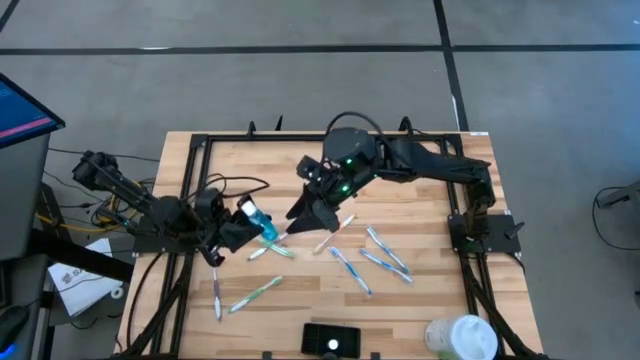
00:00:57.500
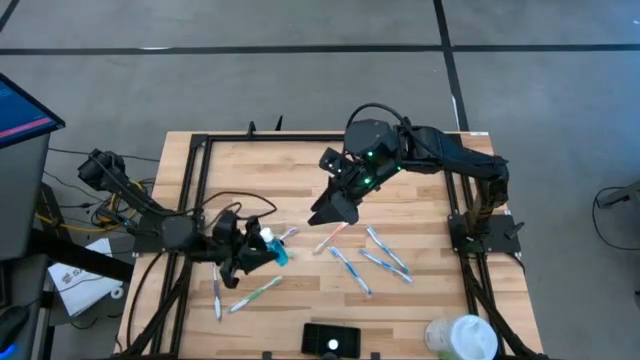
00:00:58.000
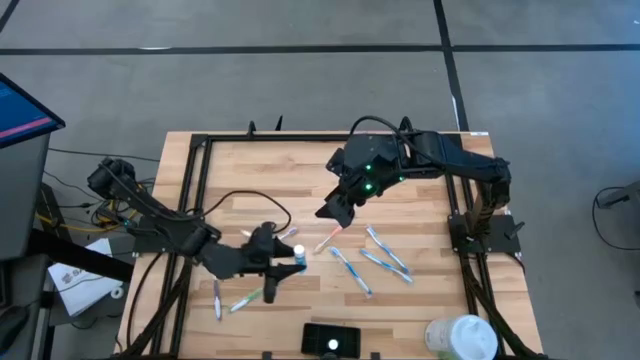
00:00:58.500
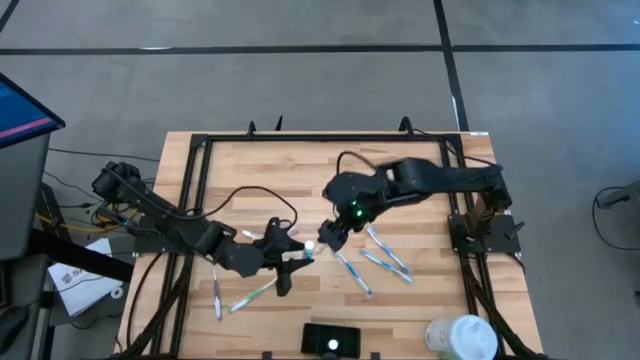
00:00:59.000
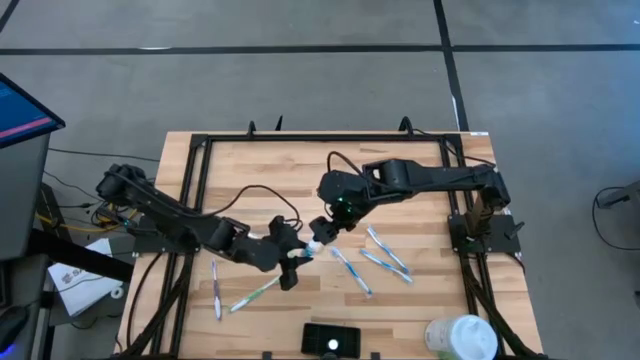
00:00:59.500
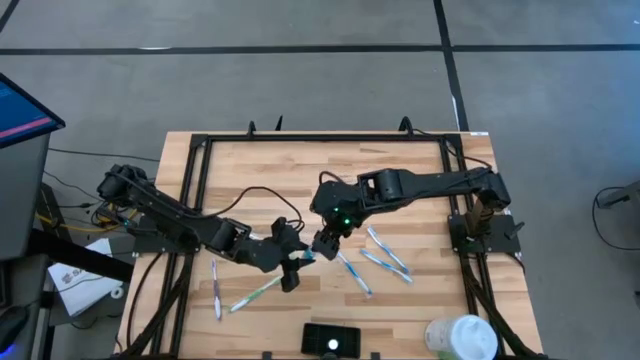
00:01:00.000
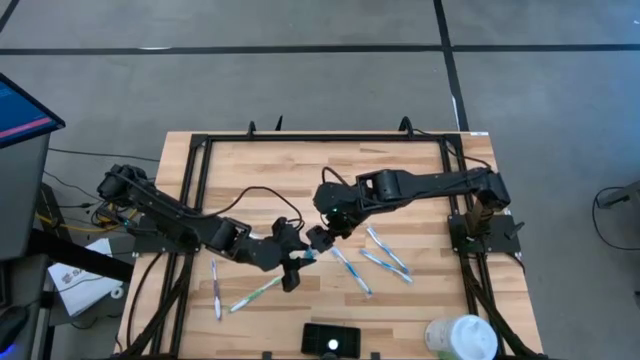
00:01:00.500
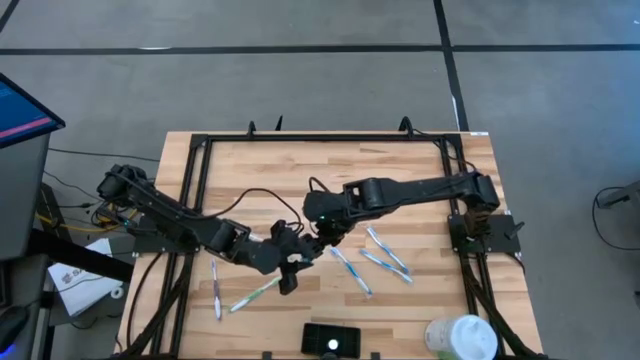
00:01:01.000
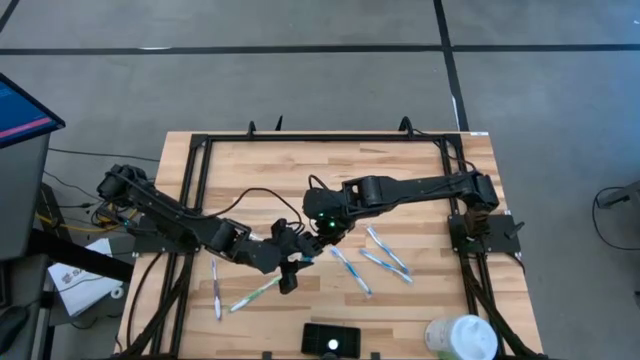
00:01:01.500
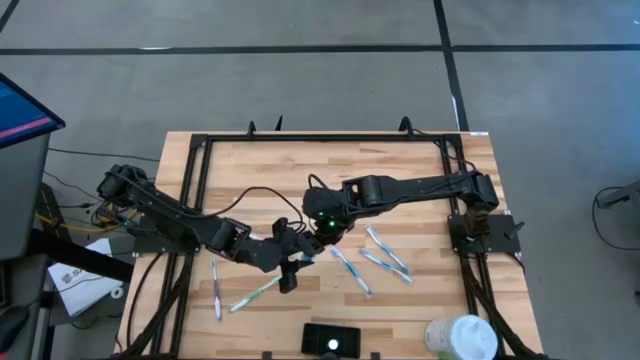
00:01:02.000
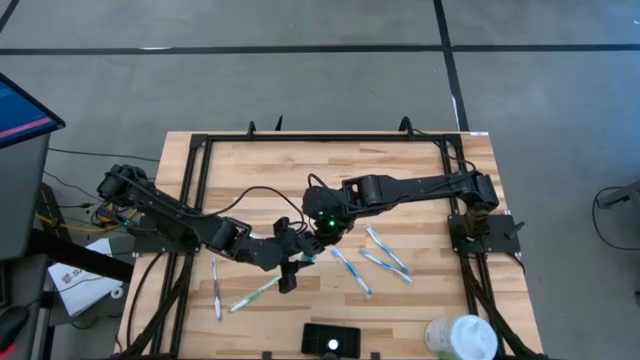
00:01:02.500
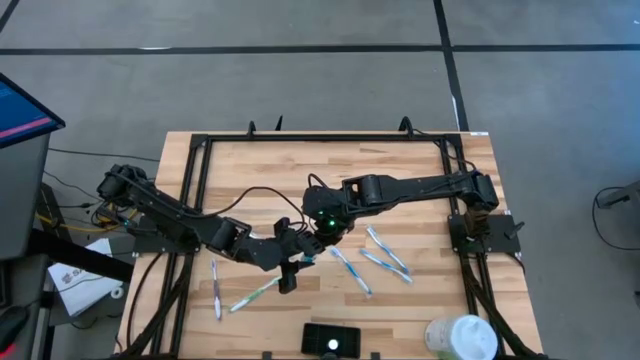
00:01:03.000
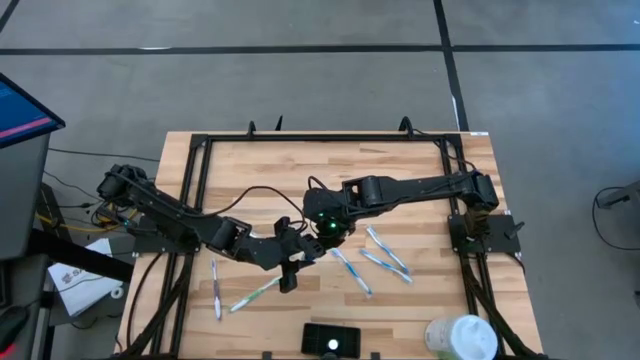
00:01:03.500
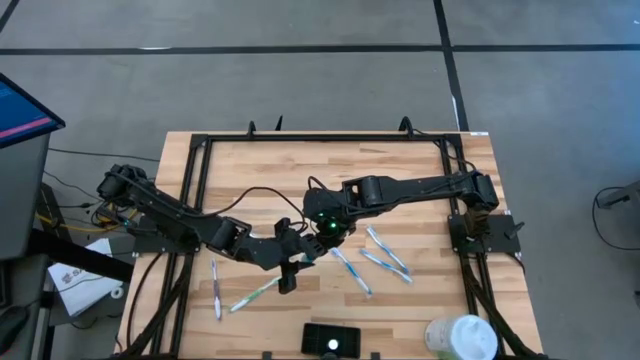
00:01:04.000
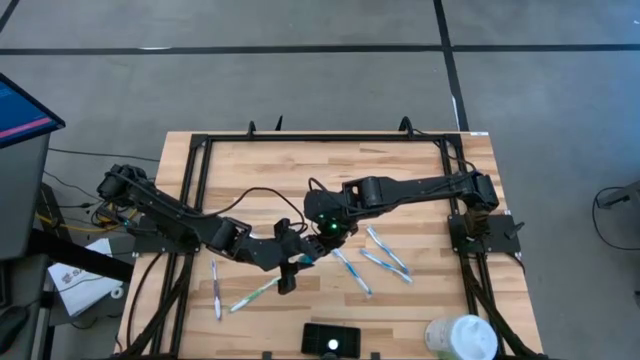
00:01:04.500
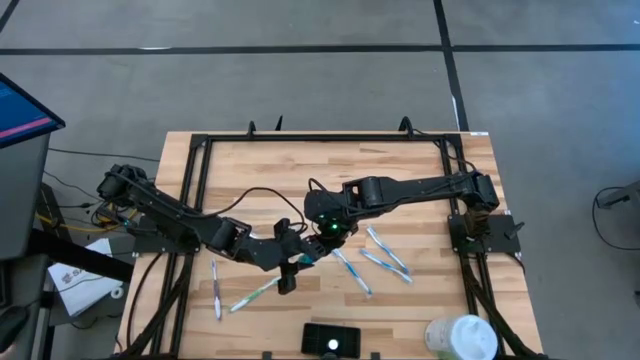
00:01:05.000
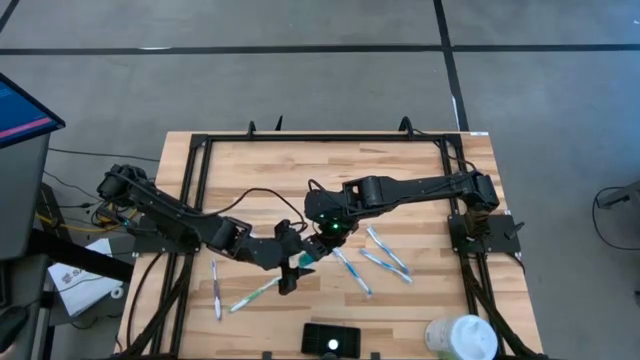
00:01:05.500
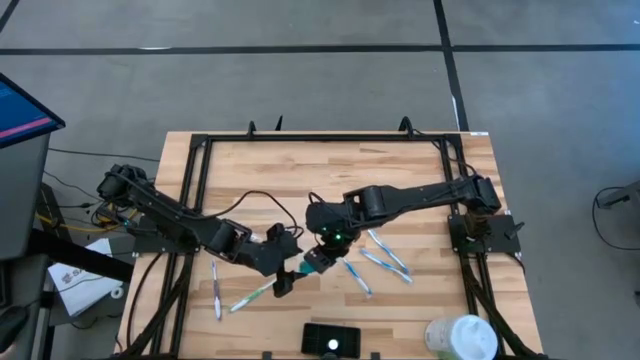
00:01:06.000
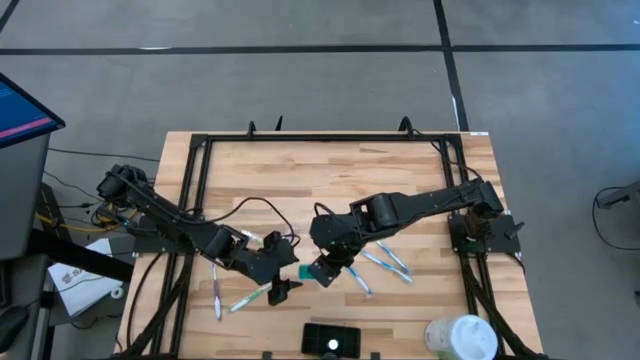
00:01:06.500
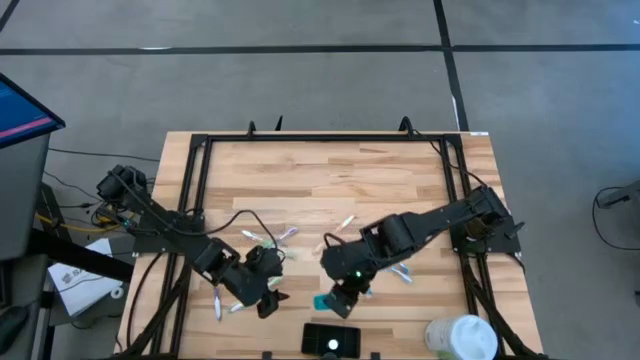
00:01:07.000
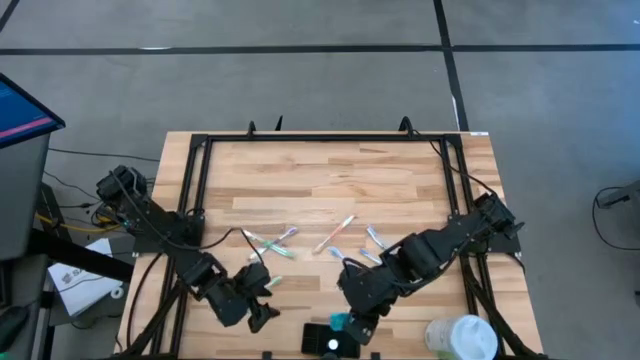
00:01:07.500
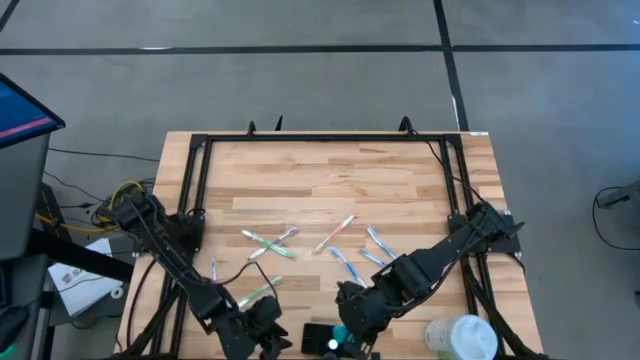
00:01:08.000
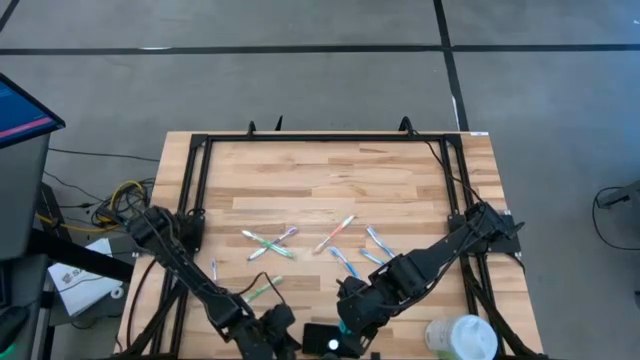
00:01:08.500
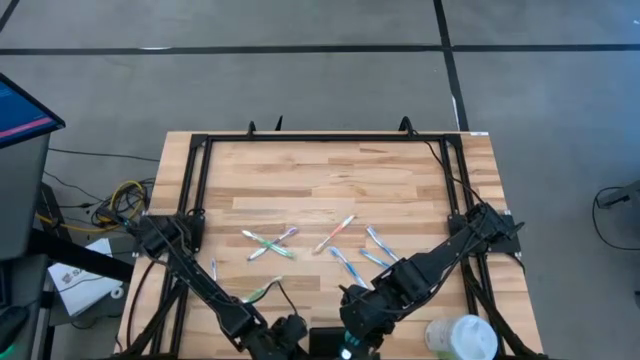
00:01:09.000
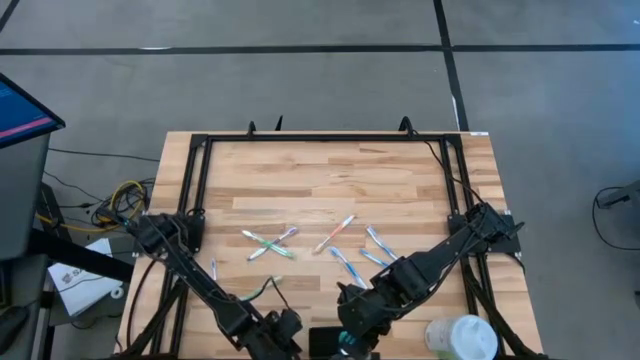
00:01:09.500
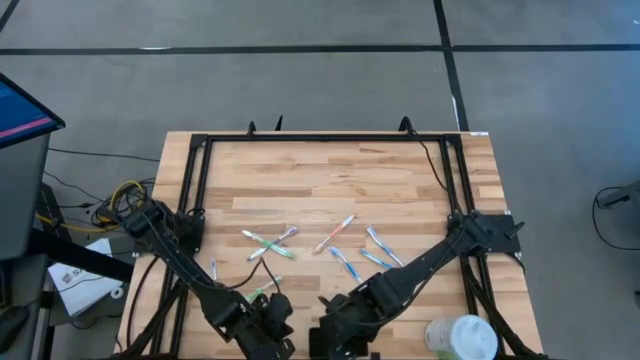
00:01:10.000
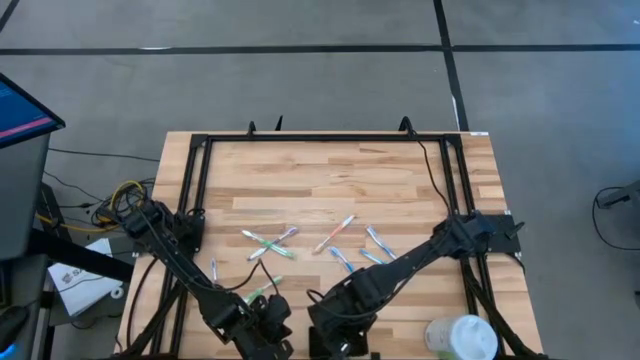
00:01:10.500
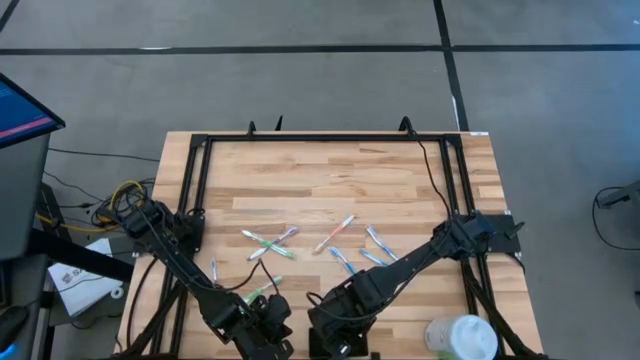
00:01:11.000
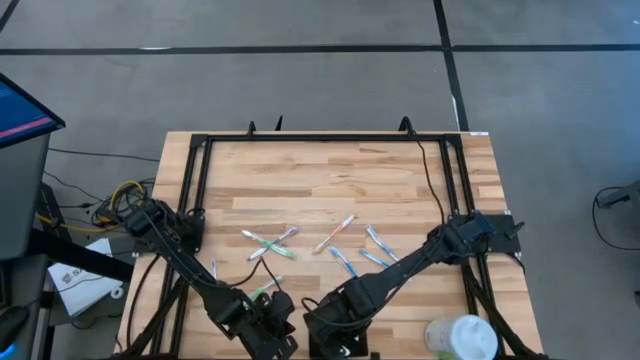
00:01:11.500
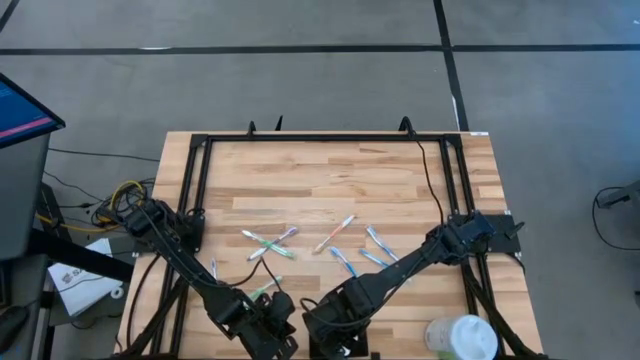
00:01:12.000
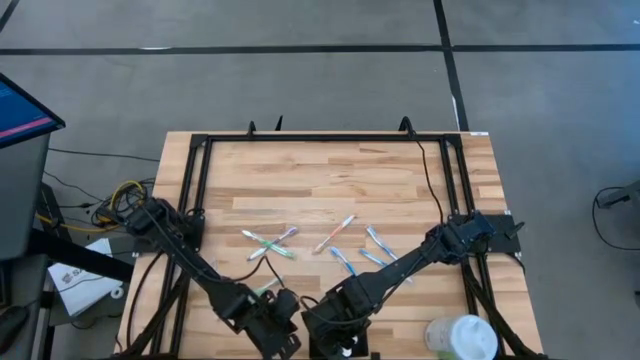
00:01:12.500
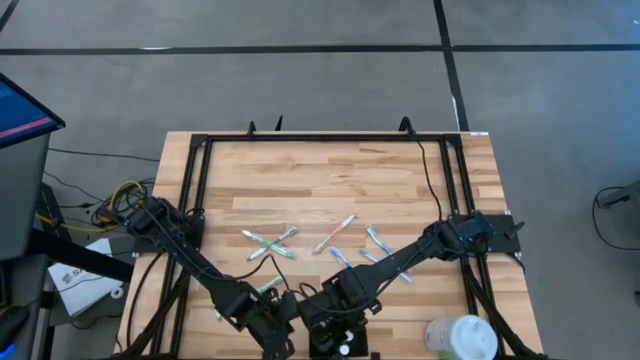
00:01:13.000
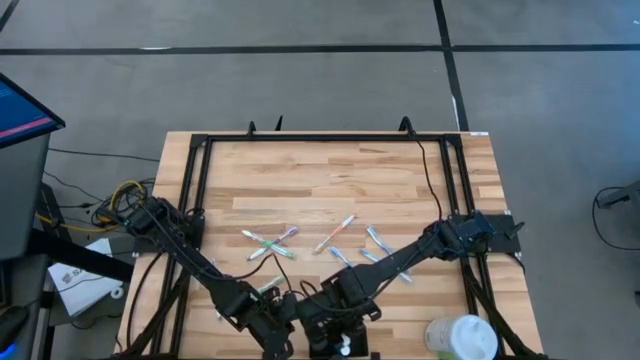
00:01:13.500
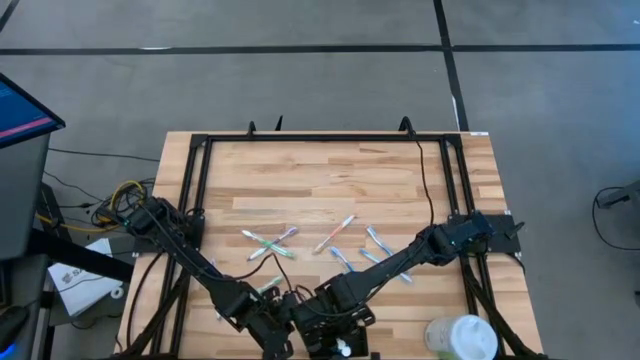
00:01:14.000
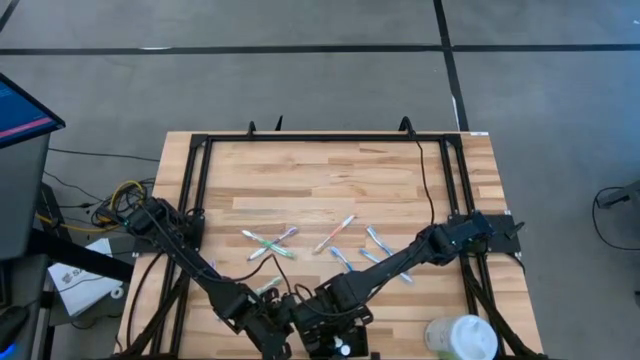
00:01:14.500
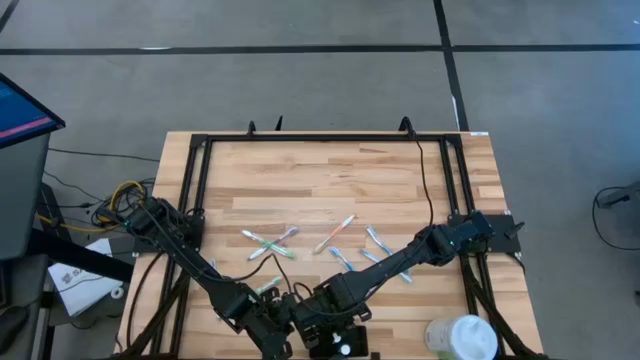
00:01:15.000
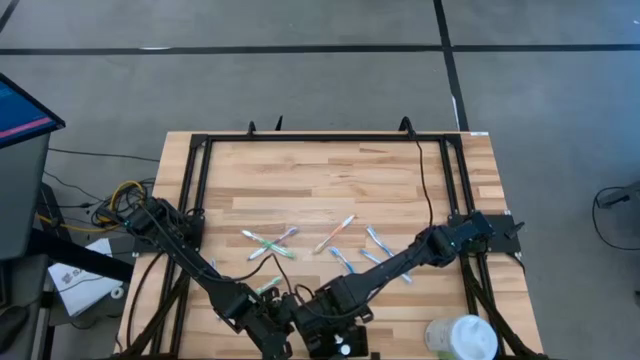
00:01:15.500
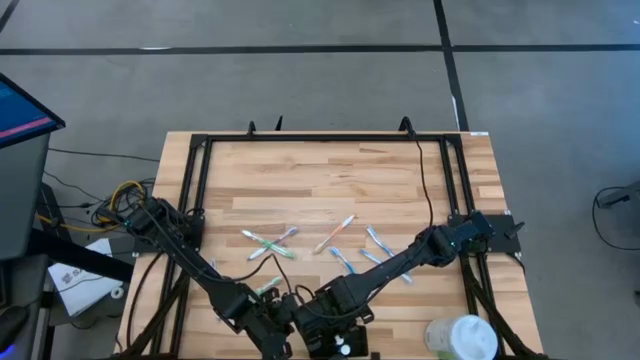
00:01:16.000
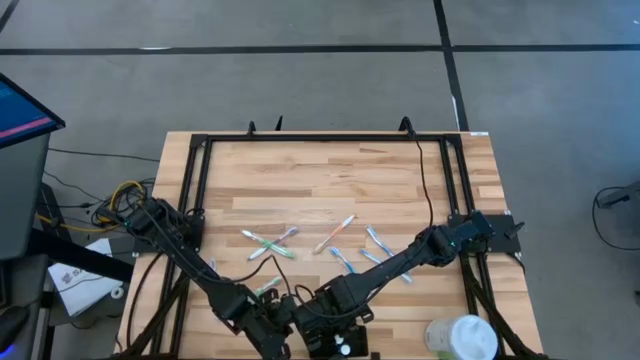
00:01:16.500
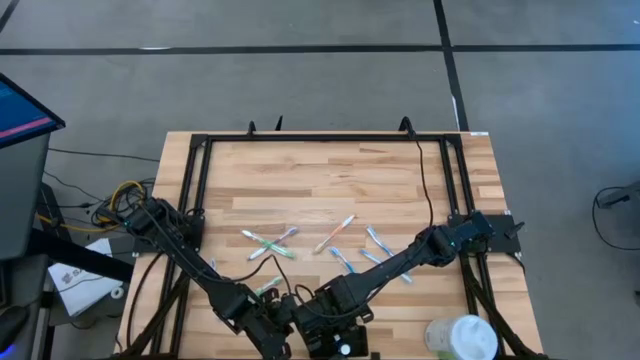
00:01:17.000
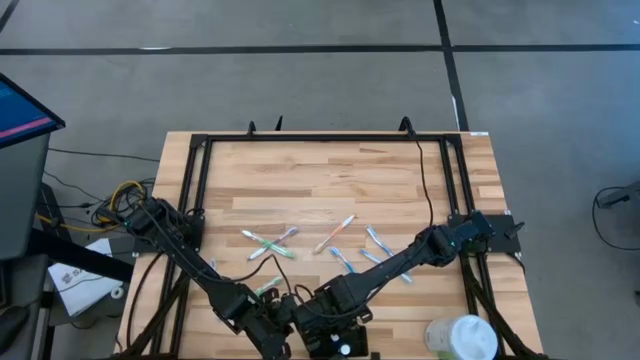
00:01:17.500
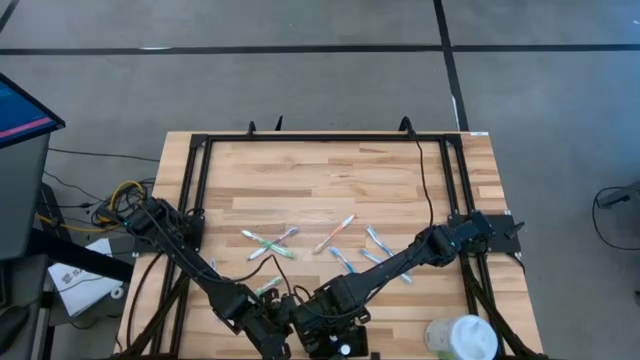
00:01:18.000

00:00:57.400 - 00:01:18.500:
Task: Pick & Place toothbrushing station
Put the blue mouthwash into the black mesh organizer
